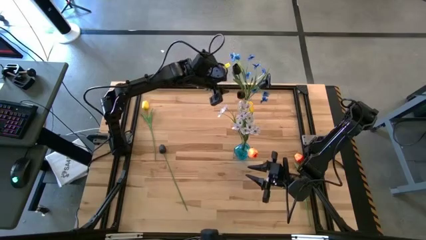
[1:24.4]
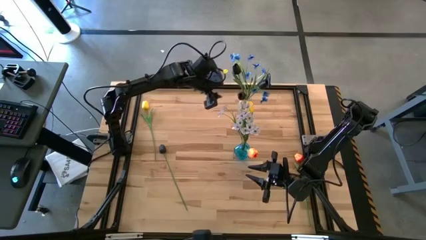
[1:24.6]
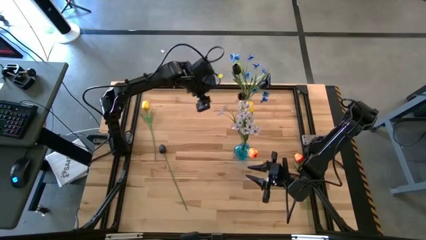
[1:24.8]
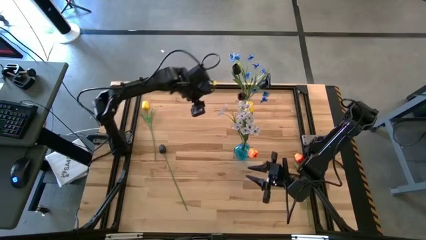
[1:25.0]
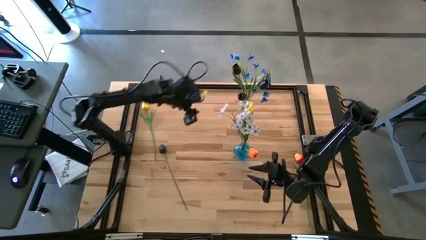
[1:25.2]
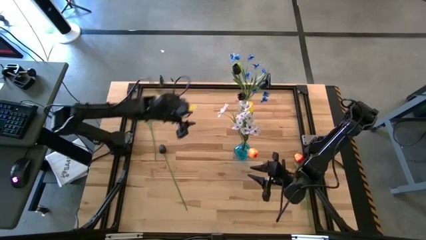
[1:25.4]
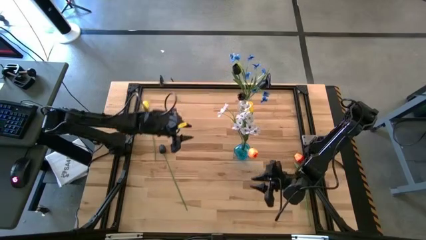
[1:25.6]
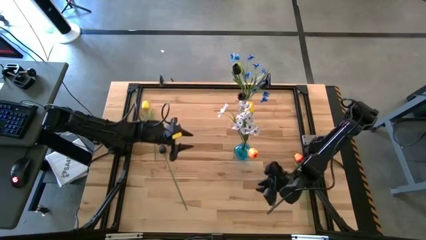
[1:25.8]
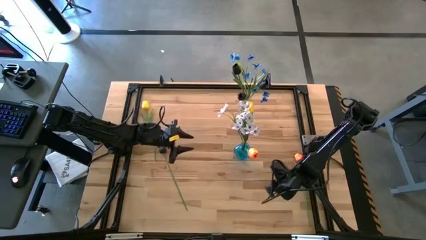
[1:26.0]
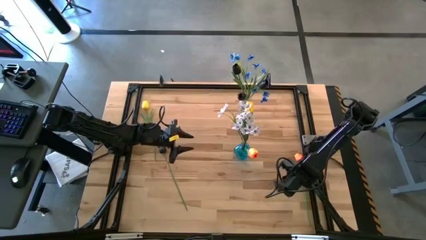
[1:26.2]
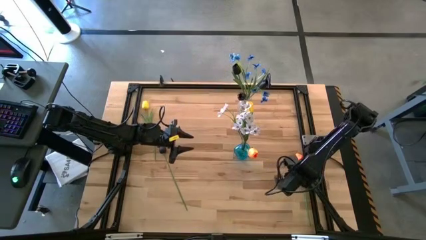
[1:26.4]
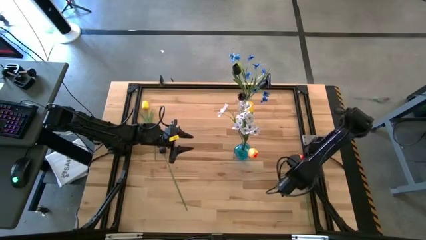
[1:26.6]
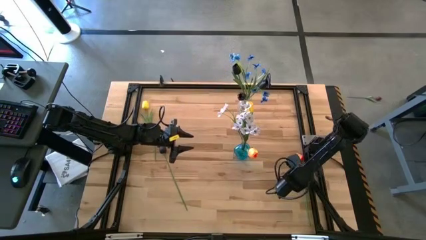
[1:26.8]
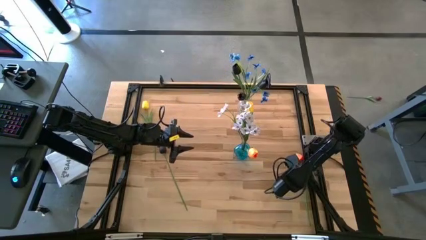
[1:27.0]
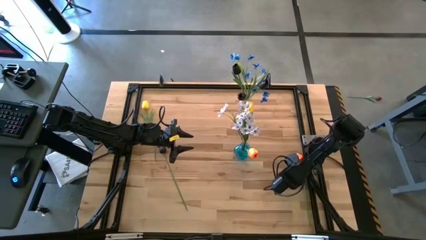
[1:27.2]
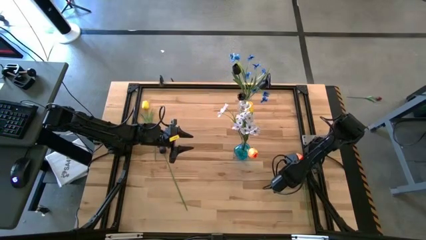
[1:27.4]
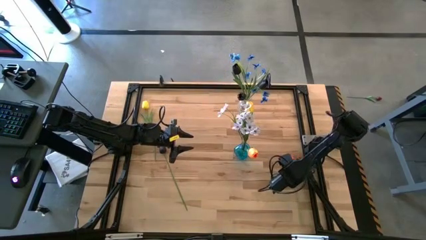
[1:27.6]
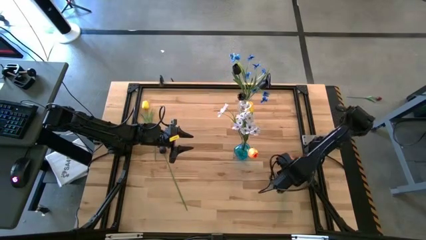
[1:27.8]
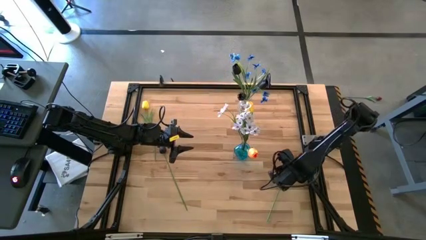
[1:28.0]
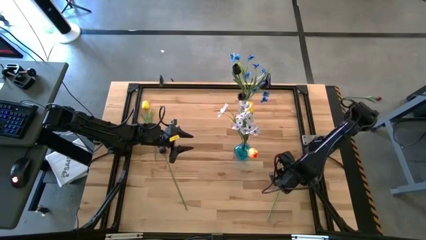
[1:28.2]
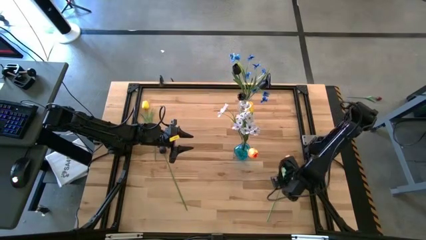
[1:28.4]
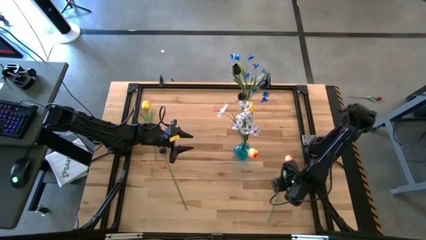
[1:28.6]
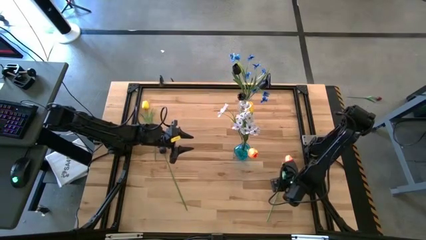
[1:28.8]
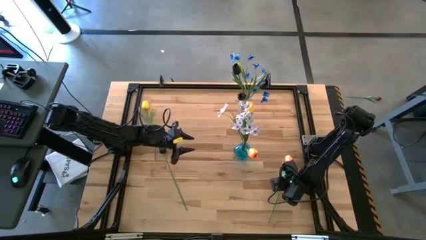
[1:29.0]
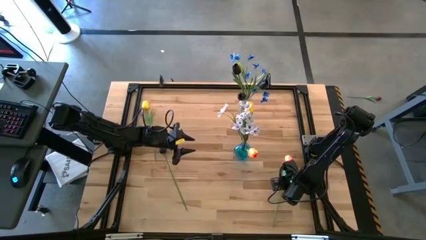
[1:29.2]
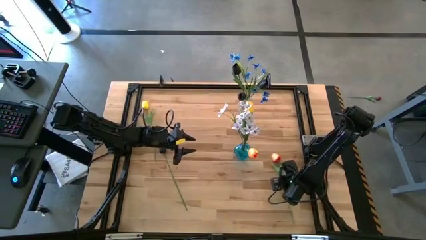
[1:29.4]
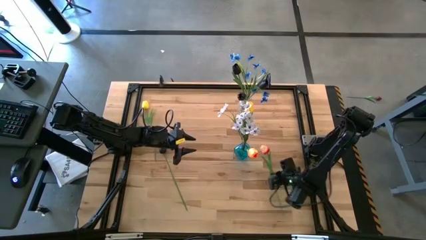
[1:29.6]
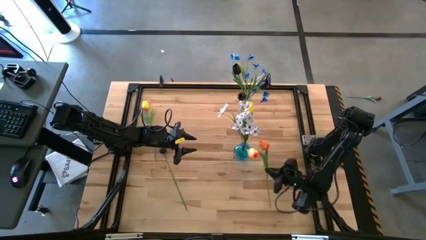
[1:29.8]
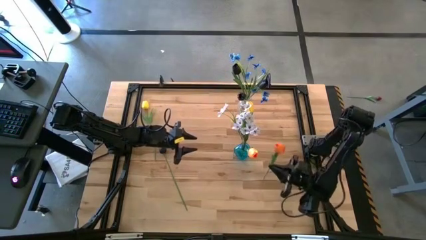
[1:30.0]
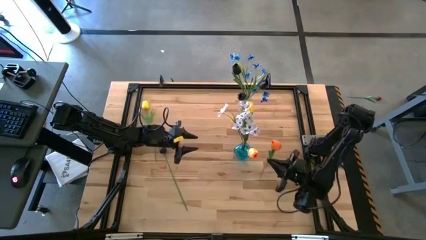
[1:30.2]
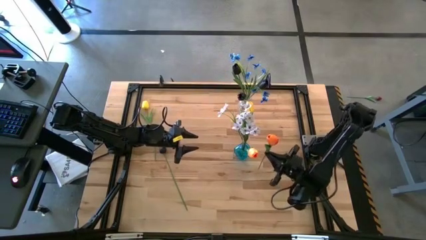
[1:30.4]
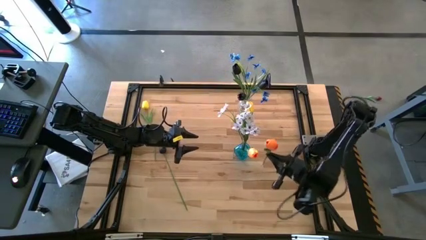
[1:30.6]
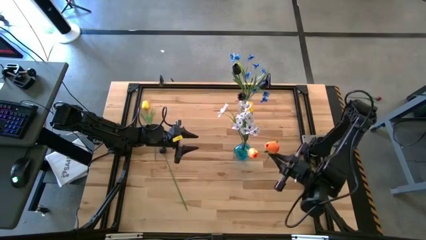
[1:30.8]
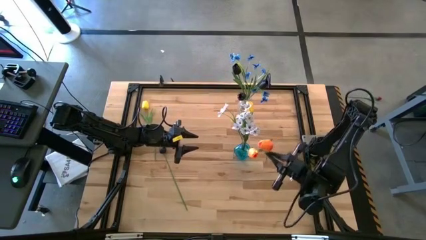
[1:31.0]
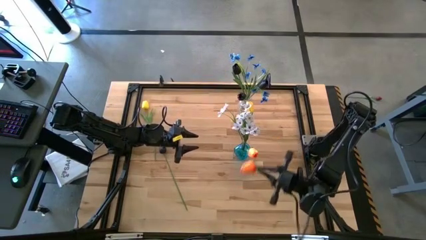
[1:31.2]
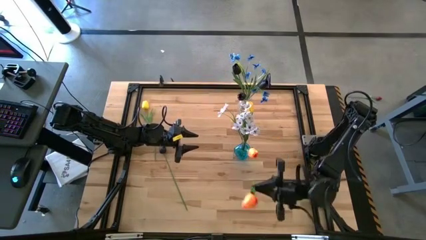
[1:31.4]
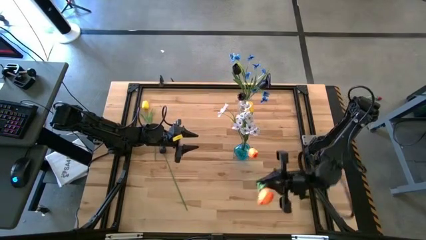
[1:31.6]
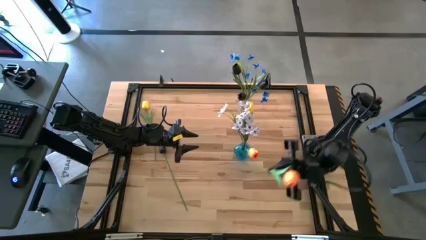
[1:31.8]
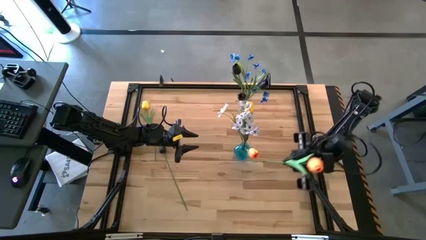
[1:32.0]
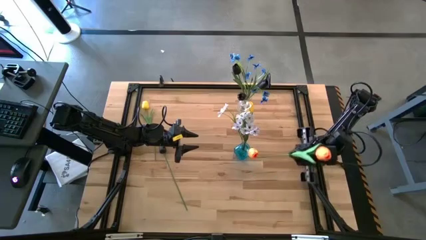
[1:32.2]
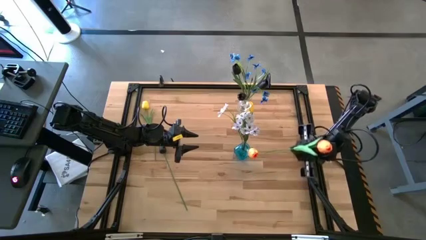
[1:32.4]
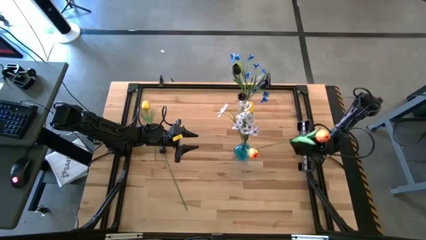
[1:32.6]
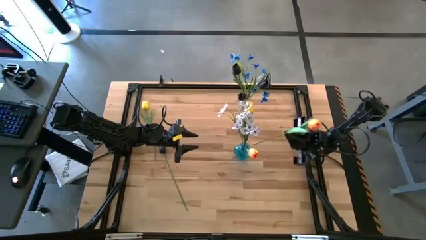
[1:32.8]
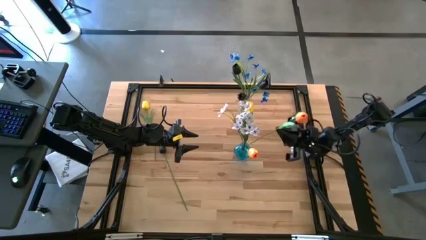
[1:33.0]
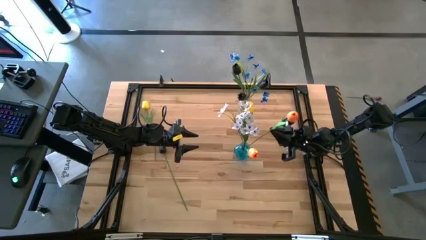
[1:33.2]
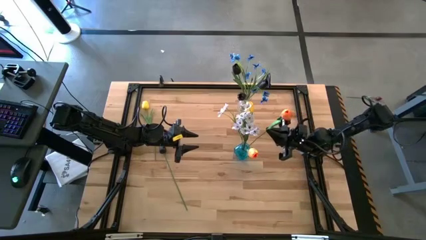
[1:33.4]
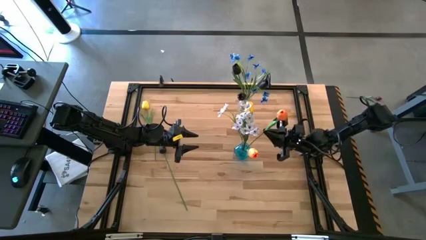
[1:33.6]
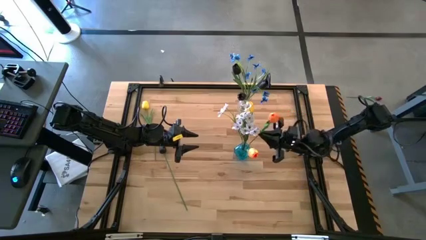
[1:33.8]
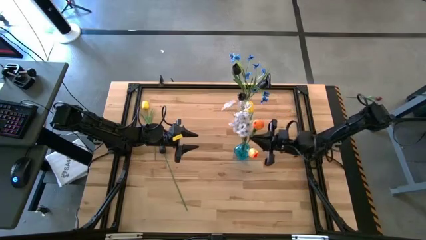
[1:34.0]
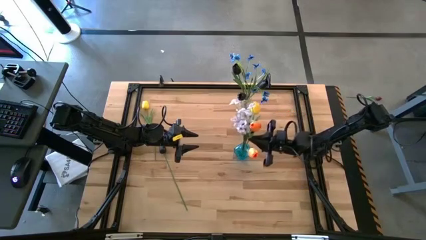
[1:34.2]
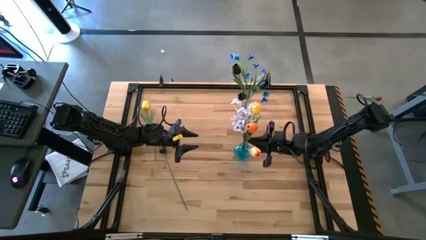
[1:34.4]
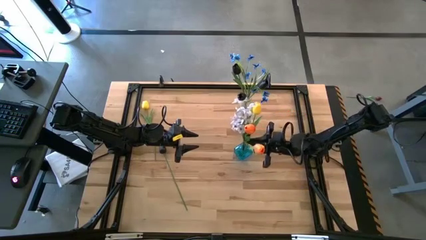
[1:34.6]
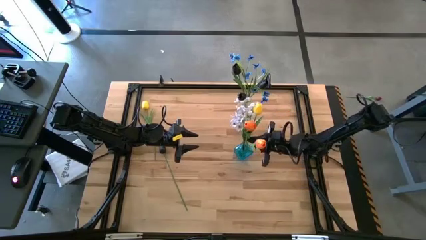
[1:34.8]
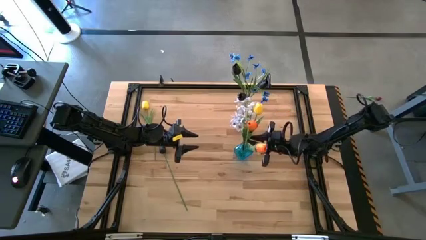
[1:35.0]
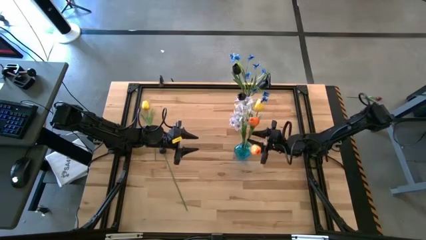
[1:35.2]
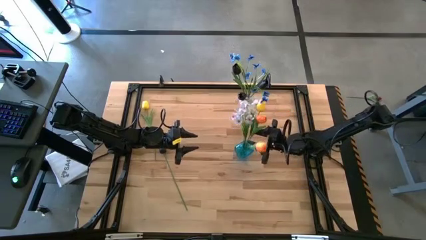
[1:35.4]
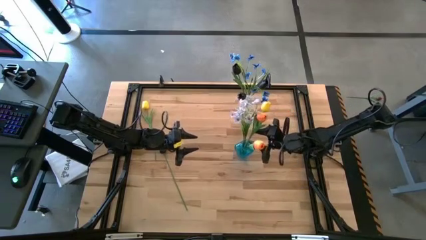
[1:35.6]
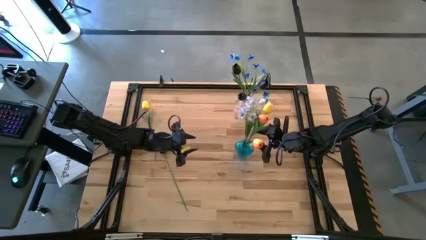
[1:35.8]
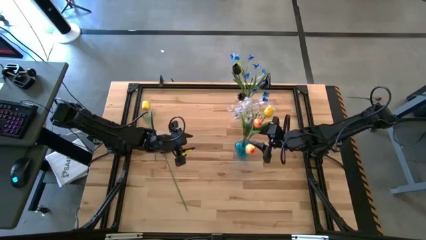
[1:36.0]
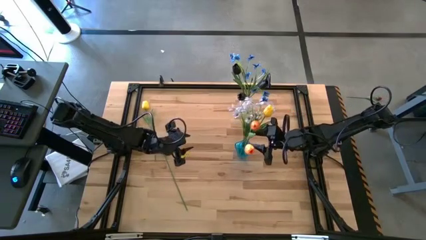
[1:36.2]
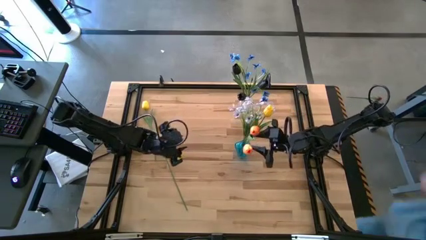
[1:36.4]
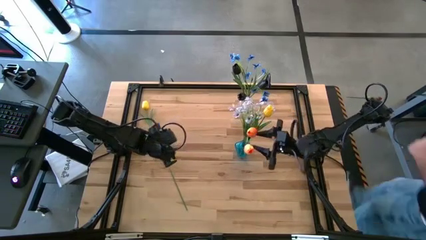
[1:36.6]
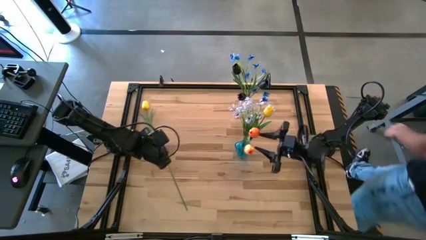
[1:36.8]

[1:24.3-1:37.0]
Task: Sort flowers into vase by color
Put the orange tulip into the blue flower vase
